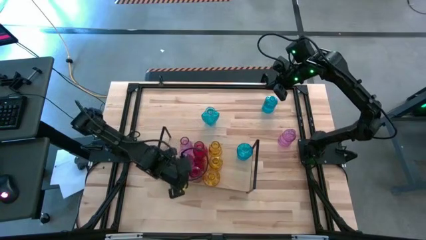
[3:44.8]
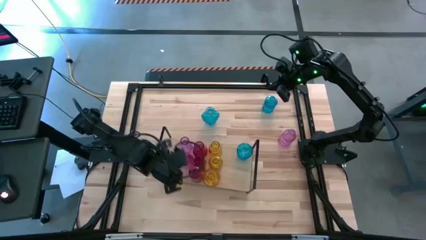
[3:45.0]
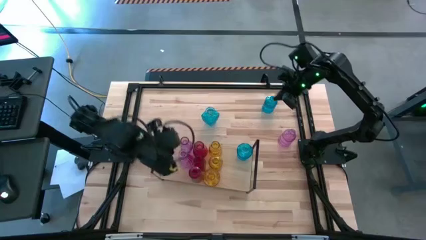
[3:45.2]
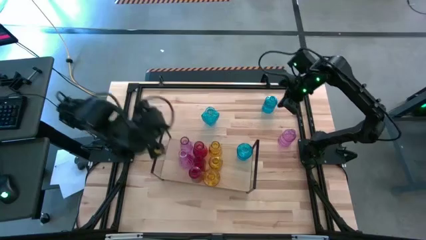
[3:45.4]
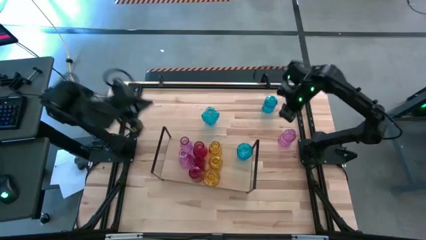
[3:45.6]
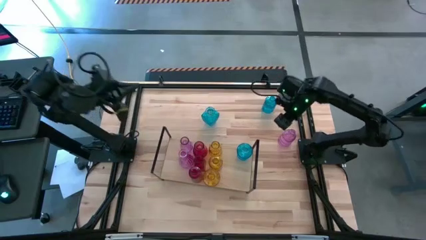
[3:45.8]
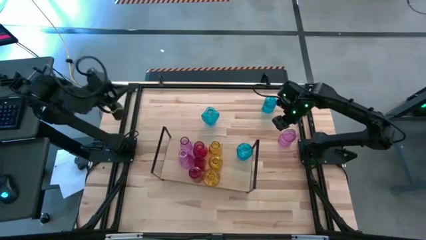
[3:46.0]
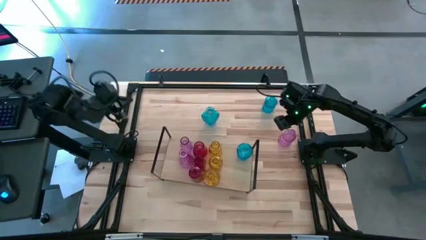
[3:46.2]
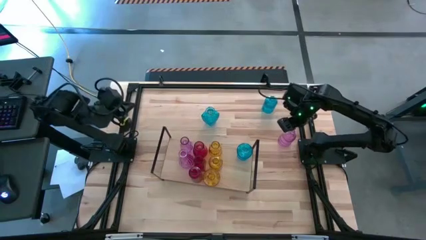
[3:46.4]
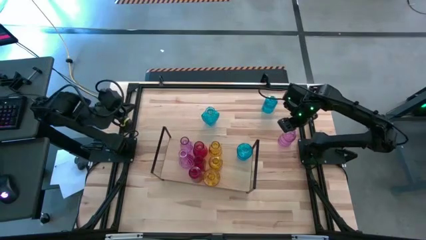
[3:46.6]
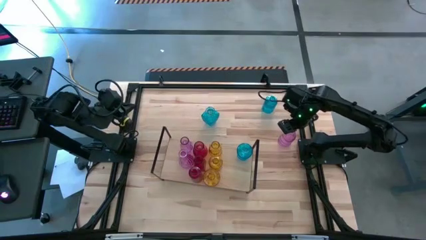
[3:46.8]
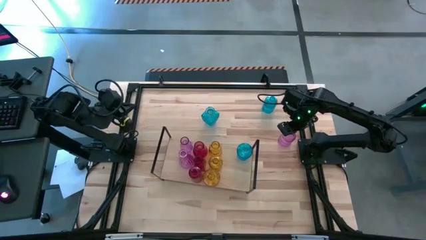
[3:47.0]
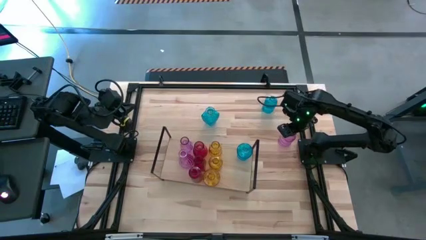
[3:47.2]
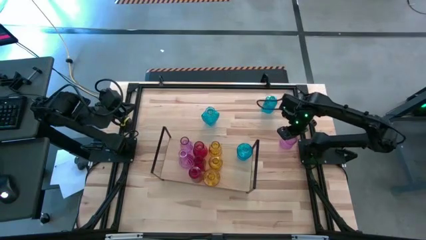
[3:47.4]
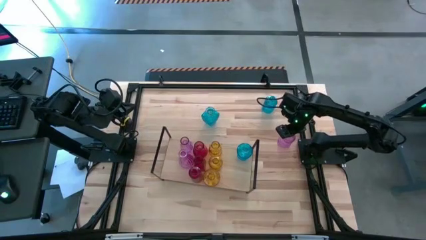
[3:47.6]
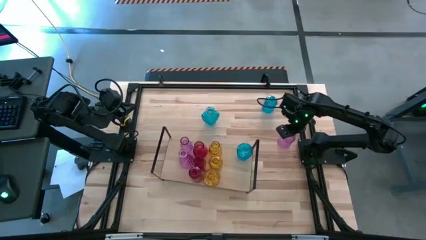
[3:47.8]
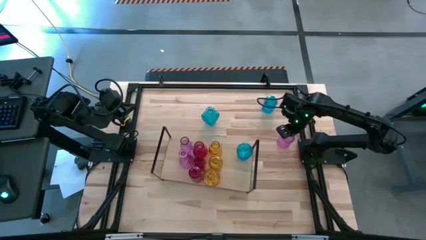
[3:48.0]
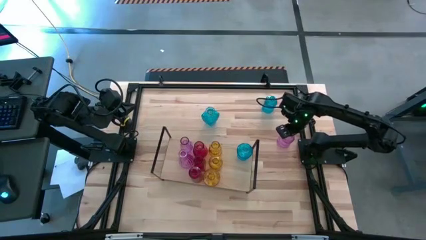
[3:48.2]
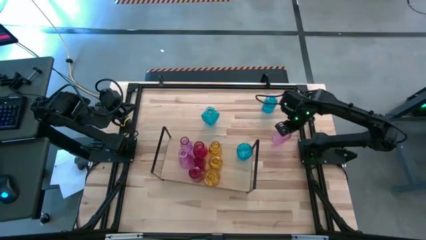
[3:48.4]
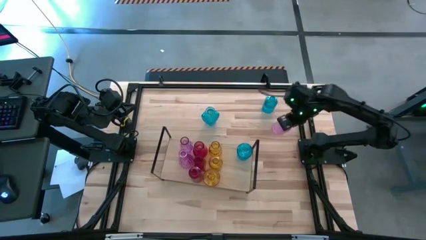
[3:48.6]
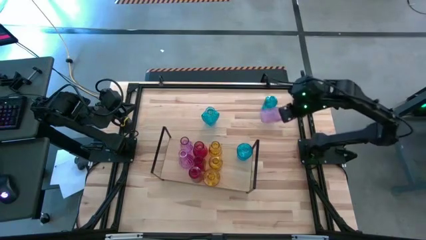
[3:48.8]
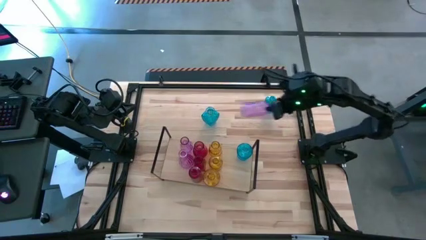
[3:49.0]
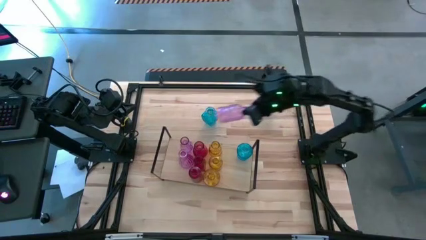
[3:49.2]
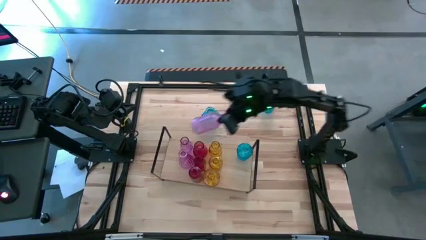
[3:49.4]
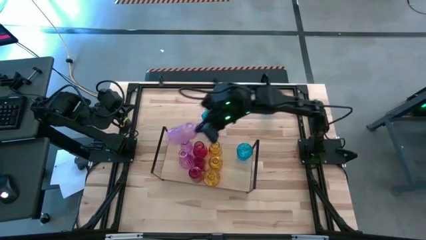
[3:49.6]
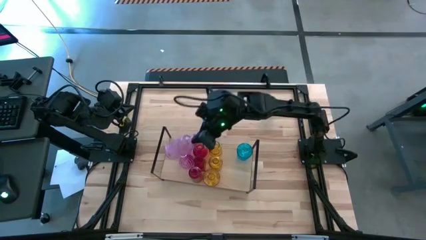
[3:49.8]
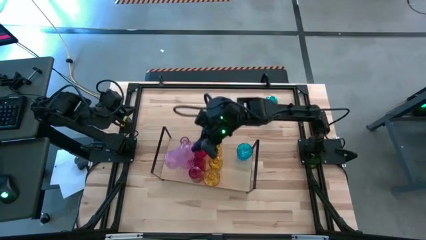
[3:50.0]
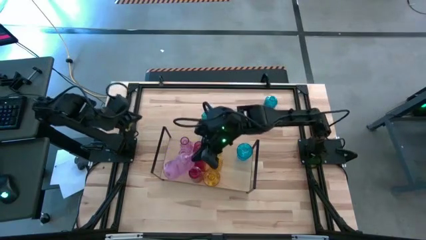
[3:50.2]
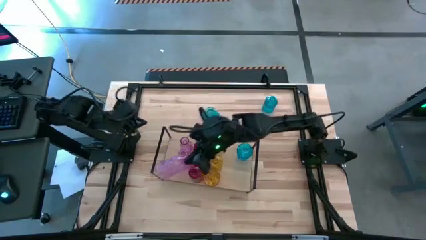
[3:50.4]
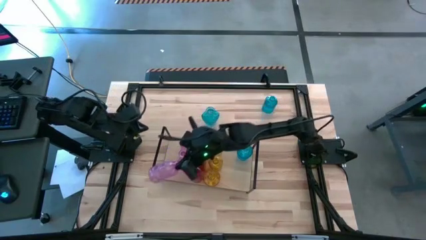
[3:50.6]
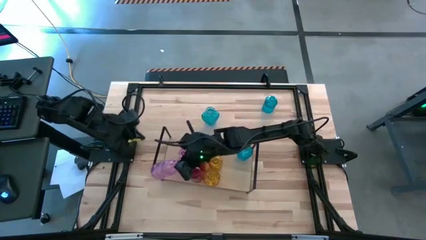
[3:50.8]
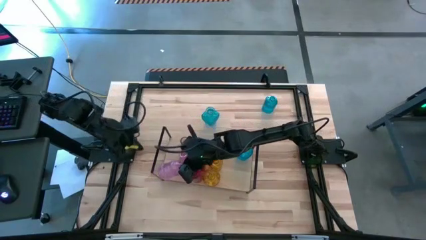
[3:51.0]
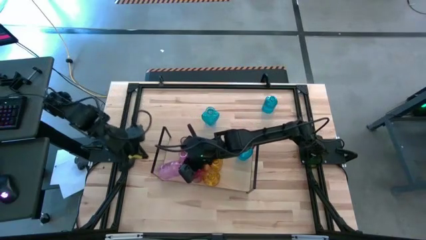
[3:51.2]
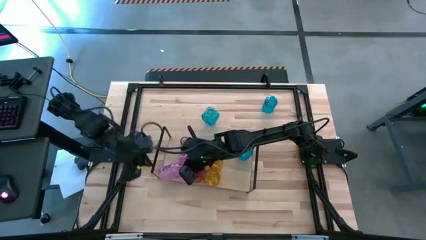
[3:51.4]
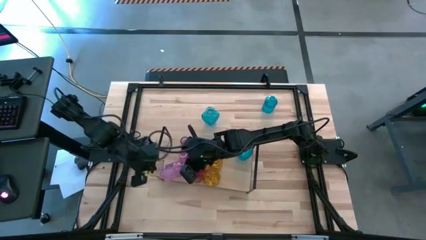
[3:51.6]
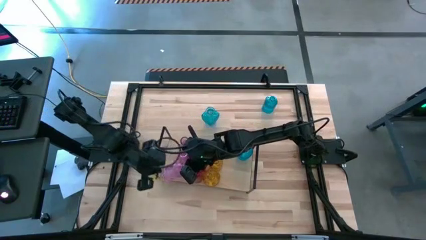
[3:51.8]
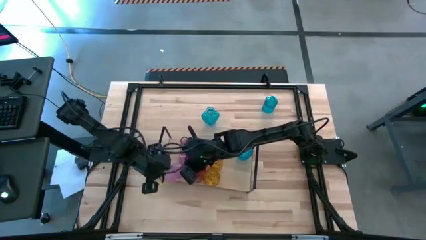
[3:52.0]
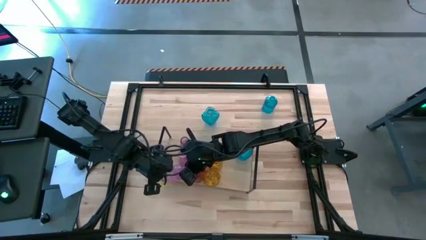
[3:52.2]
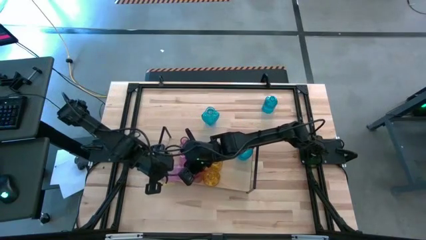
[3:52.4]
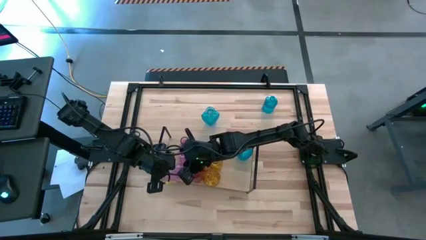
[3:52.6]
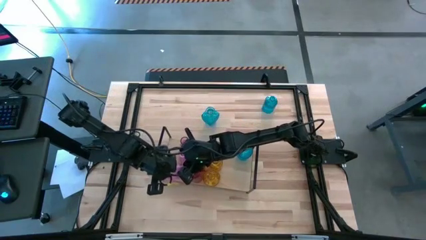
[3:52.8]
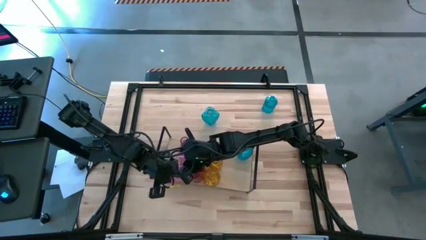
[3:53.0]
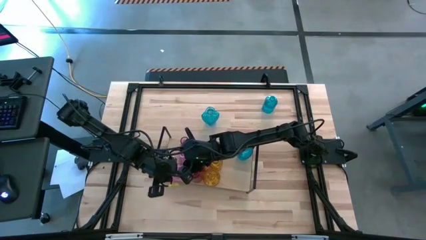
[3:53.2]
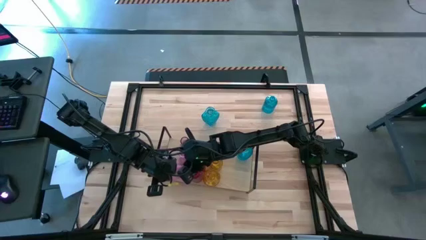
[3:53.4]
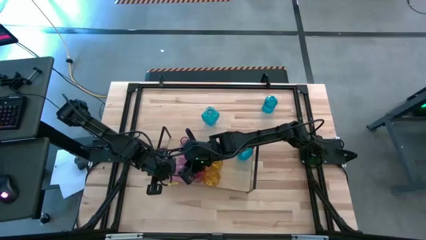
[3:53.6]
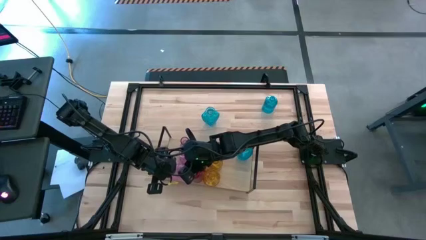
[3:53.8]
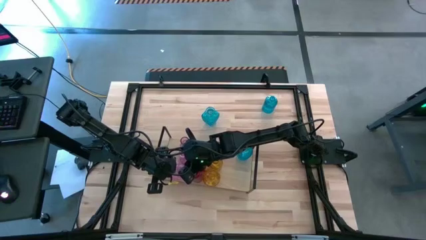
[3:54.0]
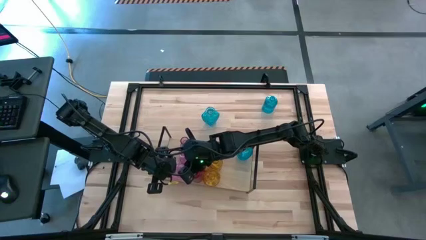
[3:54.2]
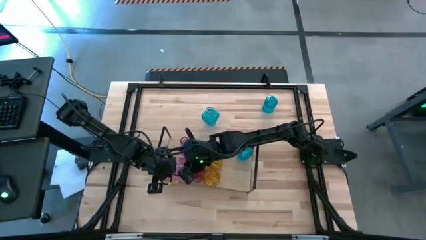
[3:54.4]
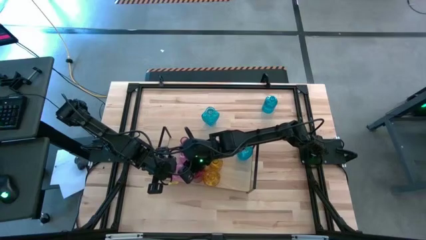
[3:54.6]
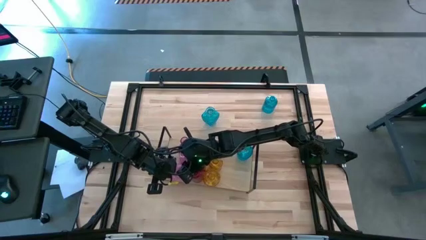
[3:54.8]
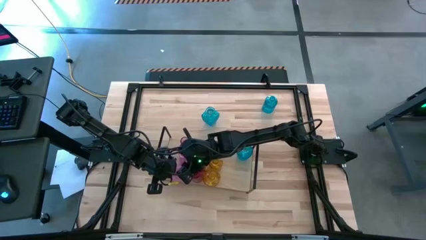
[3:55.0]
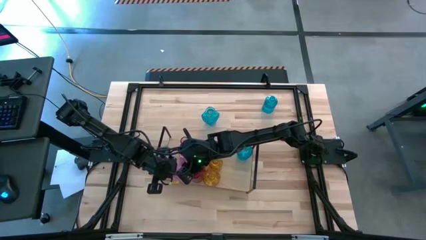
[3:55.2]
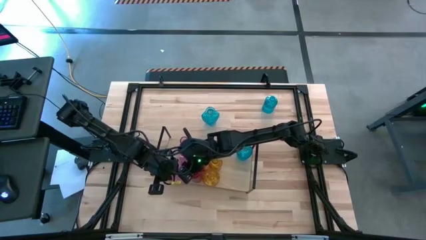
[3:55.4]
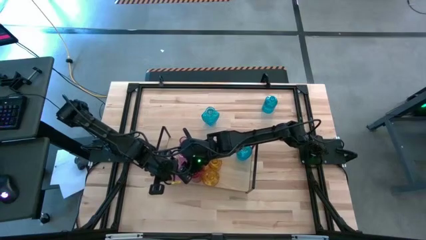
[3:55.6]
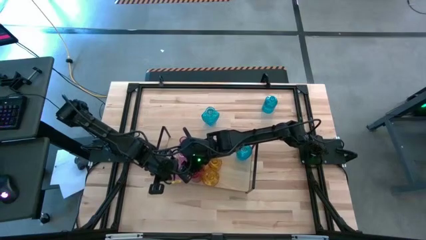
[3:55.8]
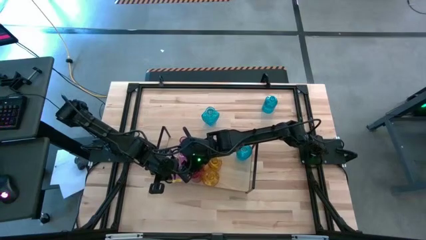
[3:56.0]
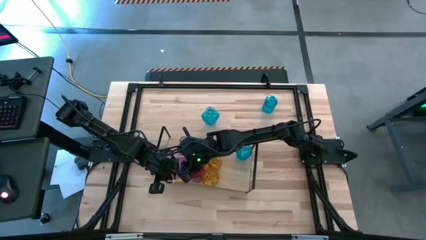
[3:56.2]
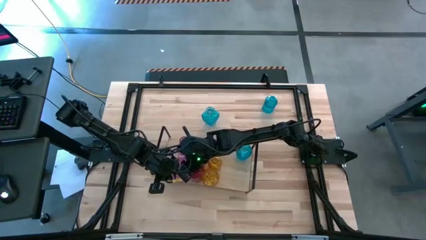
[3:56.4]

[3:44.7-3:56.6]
Task: sort vases onto shelf
Put the violet vase on the shelf aligned with the other violet vases

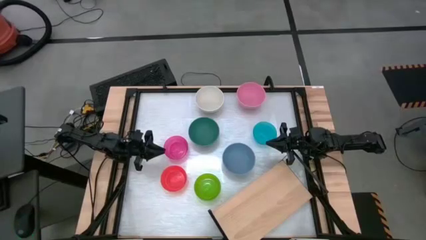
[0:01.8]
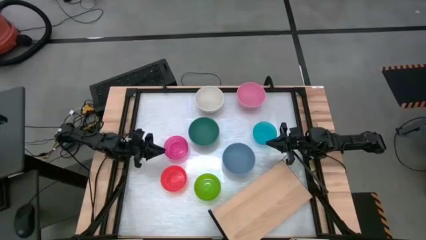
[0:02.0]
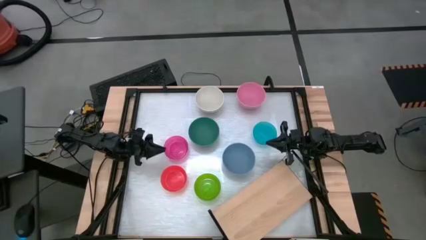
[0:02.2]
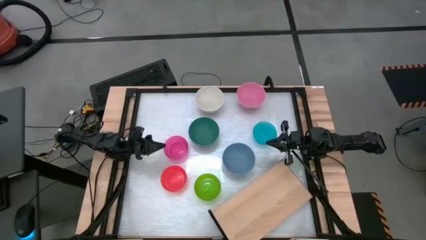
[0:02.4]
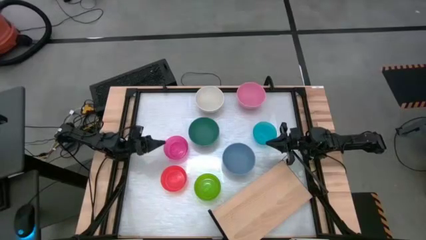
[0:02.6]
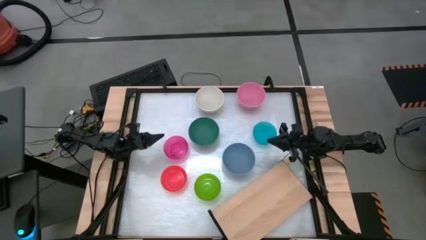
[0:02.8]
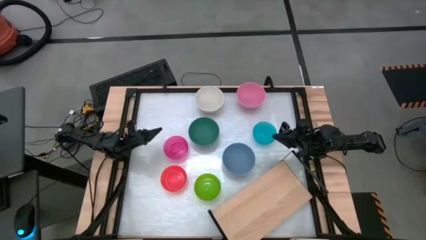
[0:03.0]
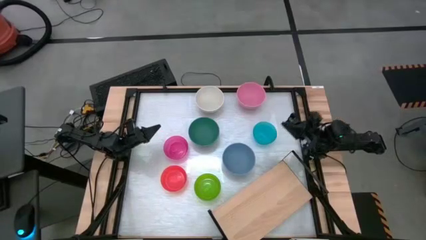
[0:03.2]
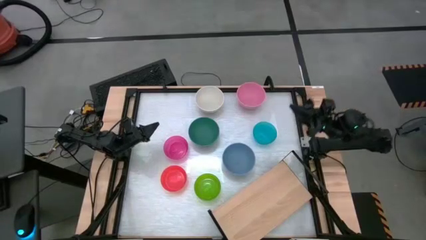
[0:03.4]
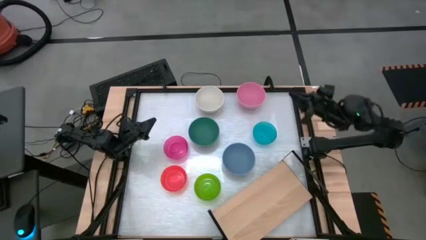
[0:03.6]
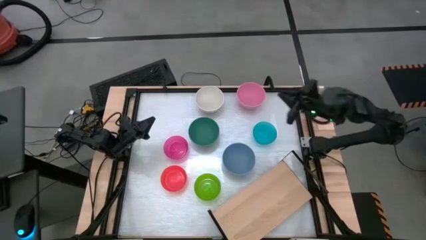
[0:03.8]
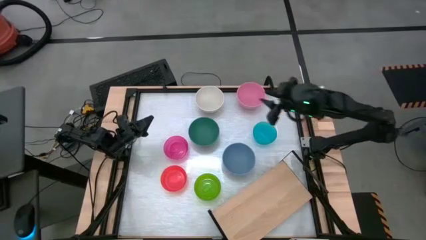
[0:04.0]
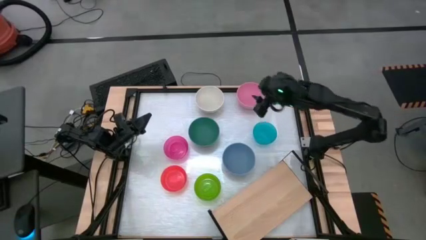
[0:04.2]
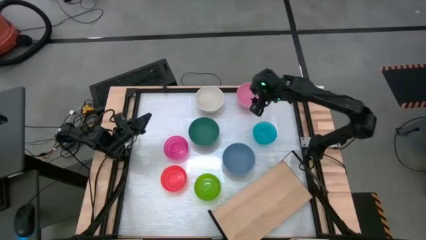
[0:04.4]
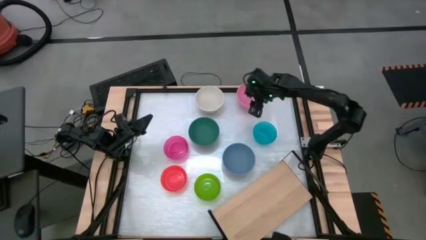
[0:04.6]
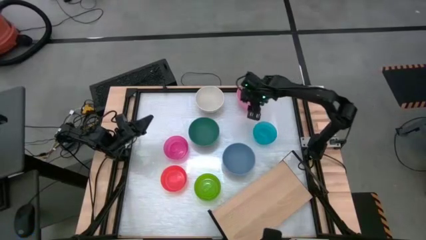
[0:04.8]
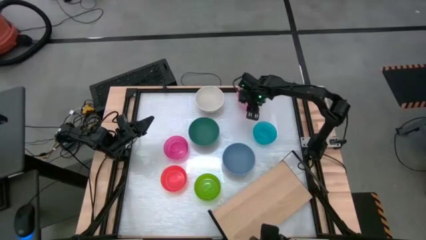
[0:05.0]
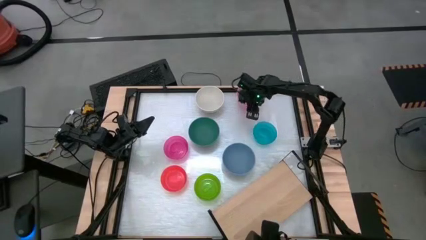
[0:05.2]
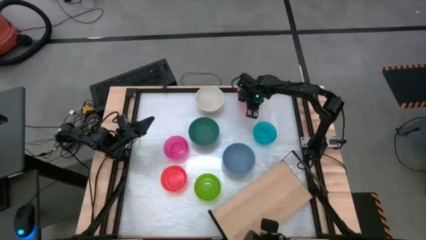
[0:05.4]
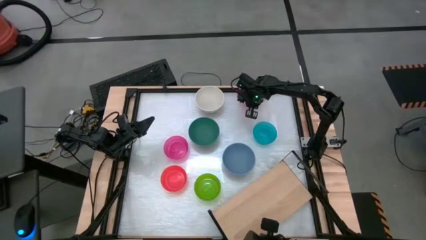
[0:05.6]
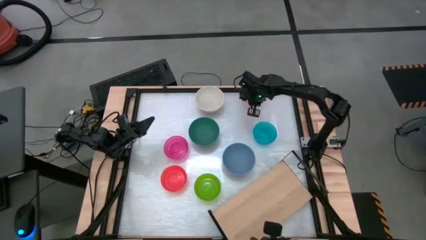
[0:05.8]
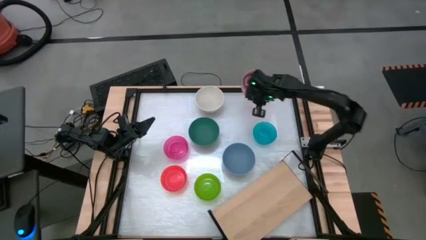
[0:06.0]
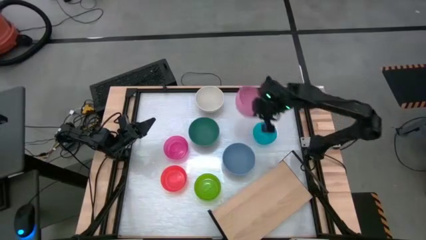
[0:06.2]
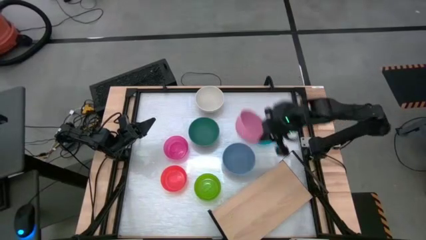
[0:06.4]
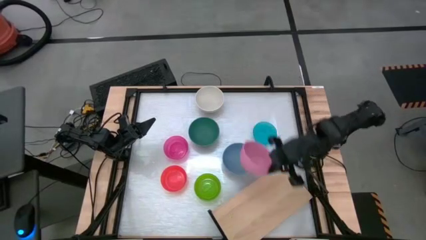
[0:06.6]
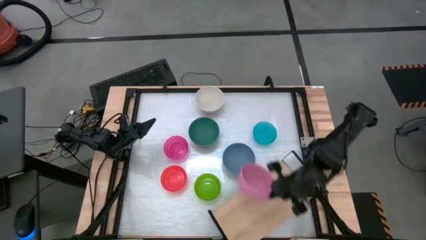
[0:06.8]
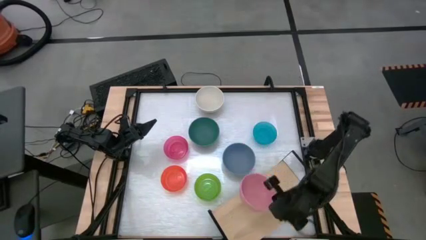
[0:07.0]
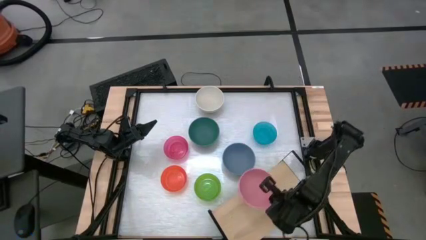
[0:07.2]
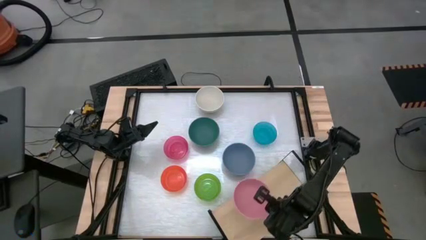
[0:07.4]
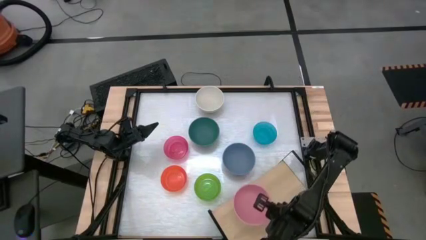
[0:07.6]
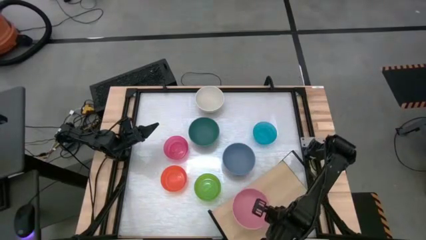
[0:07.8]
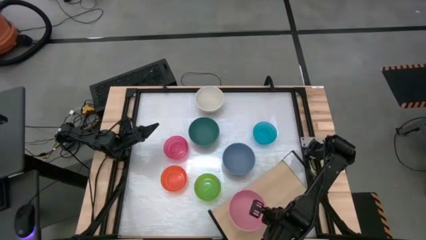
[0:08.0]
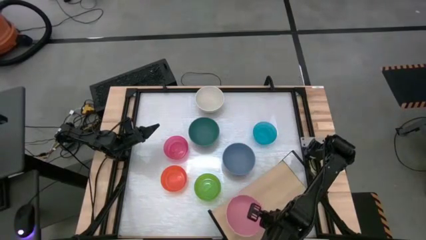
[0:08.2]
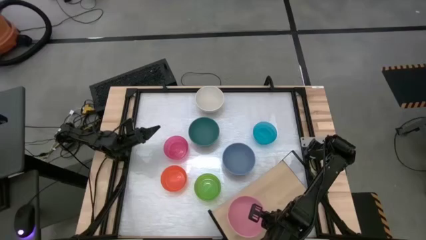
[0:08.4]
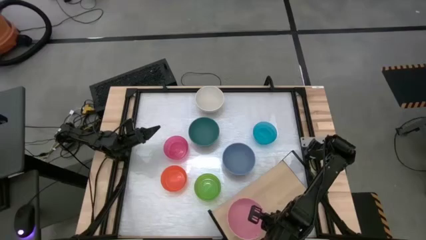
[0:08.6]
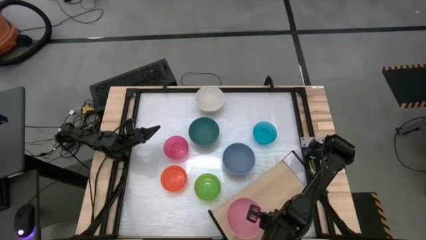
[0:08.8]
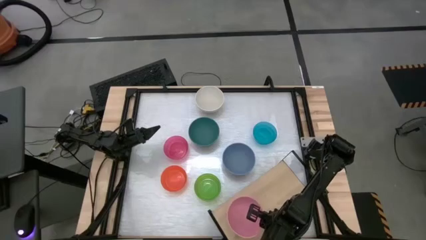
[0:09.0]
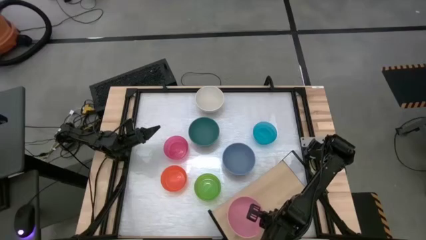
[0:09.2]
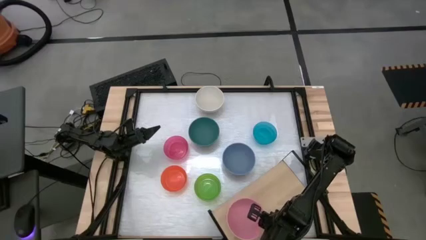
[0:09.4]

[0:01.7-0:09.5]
Task: Place and stack bowls onto a shelf
Put the light pink bowl on the shelf
